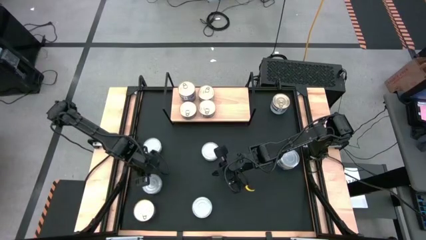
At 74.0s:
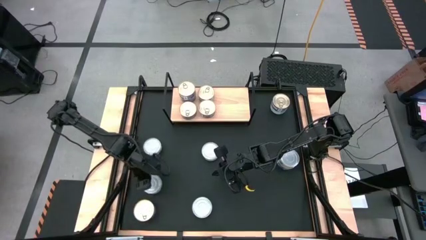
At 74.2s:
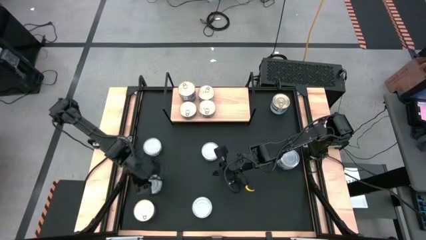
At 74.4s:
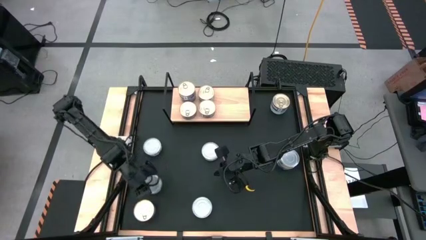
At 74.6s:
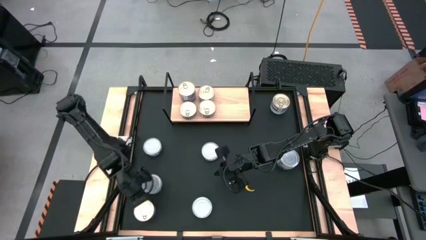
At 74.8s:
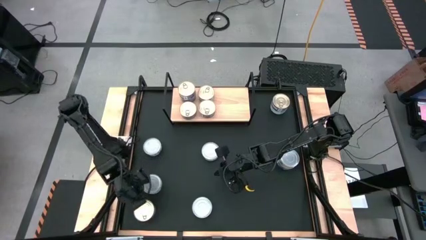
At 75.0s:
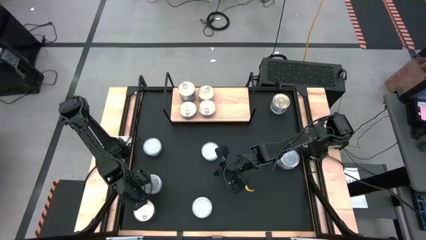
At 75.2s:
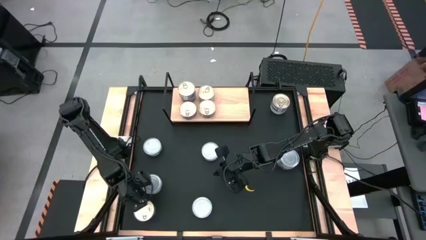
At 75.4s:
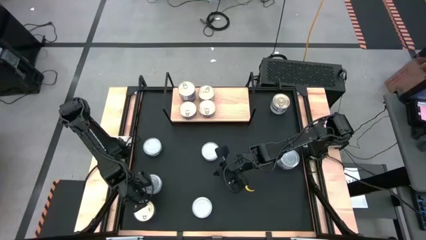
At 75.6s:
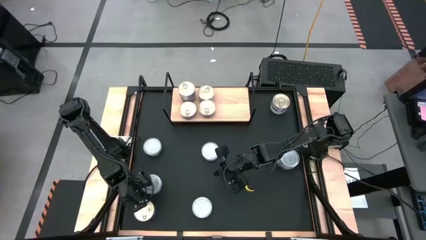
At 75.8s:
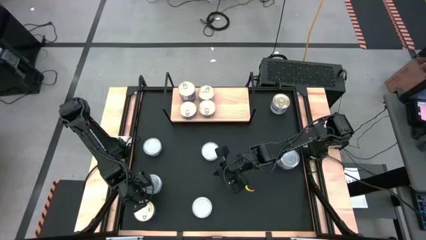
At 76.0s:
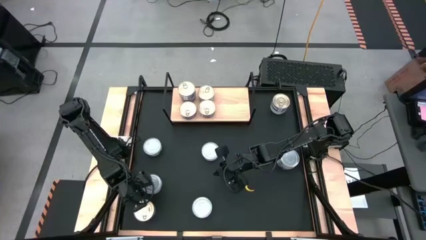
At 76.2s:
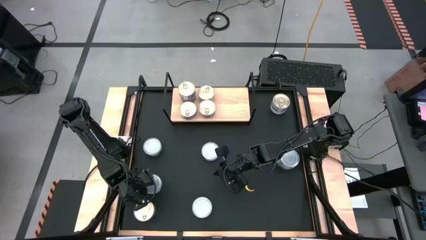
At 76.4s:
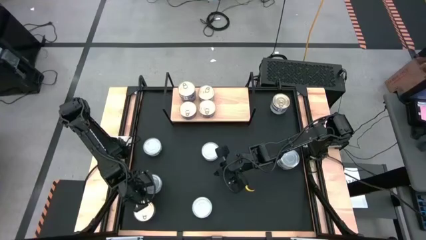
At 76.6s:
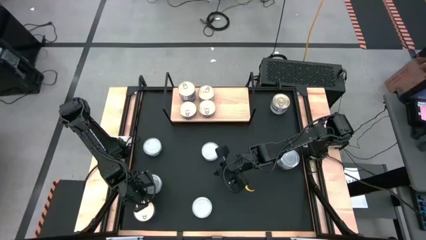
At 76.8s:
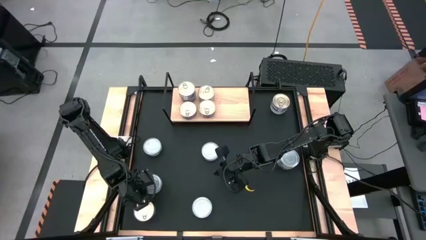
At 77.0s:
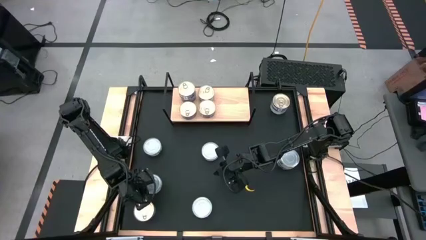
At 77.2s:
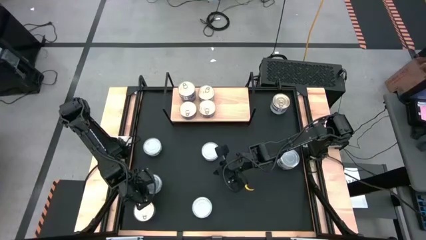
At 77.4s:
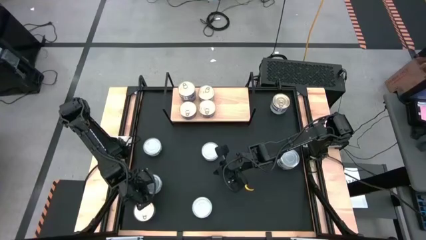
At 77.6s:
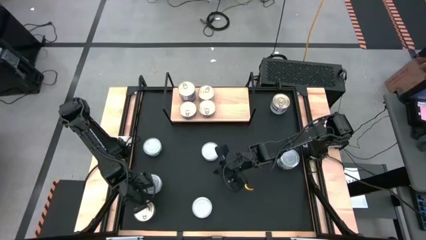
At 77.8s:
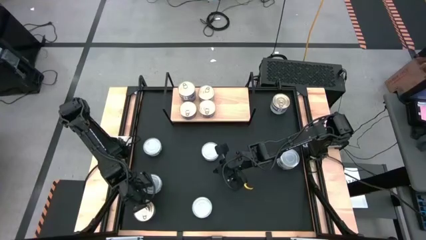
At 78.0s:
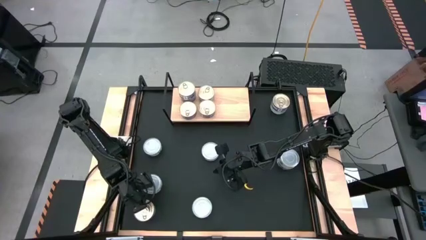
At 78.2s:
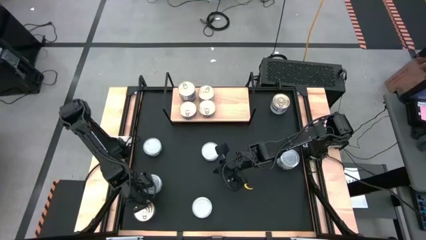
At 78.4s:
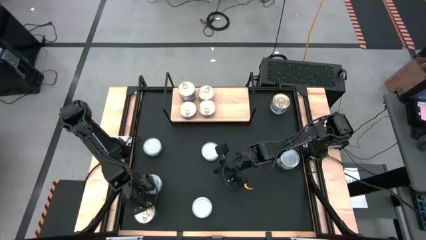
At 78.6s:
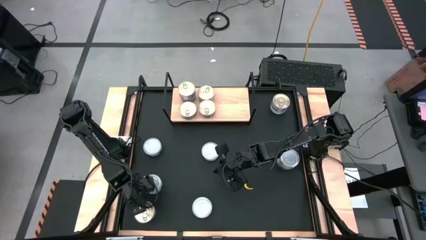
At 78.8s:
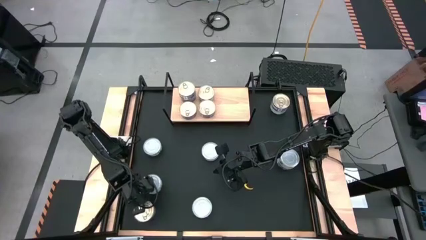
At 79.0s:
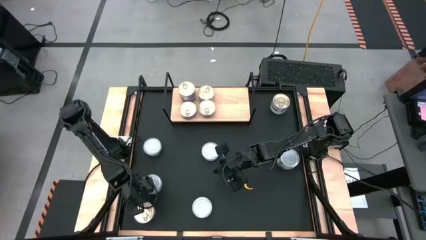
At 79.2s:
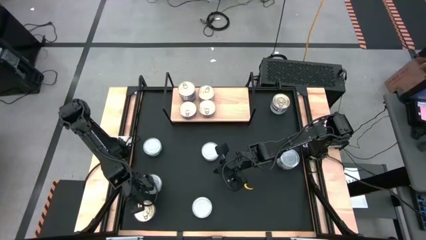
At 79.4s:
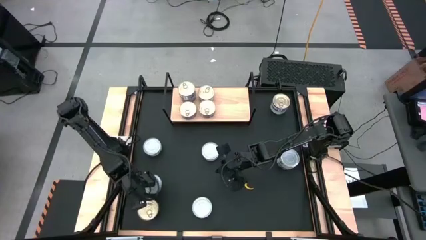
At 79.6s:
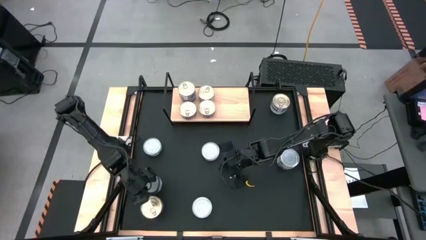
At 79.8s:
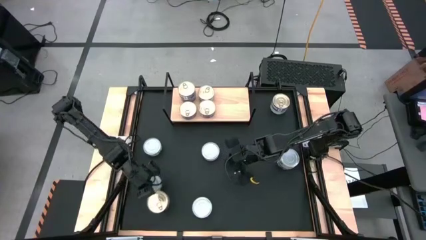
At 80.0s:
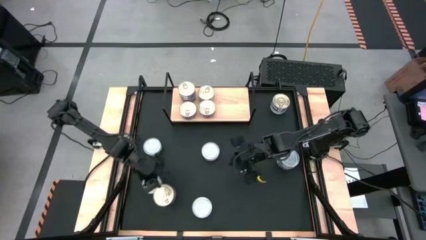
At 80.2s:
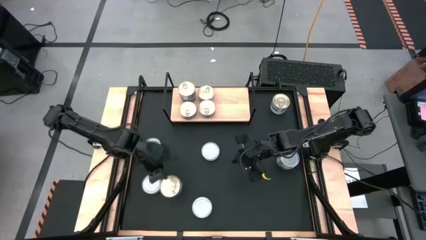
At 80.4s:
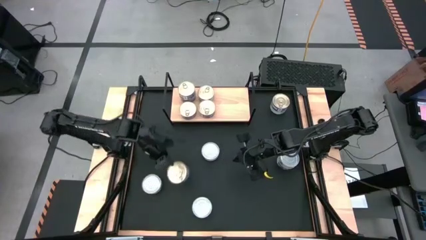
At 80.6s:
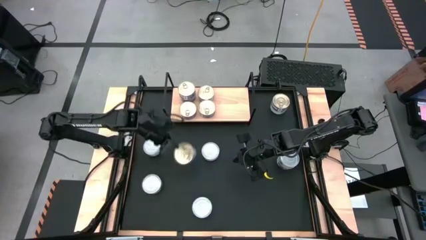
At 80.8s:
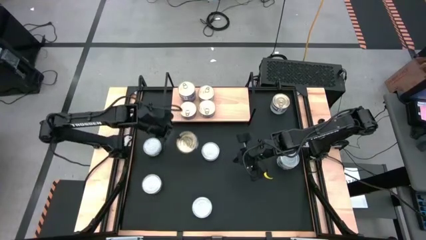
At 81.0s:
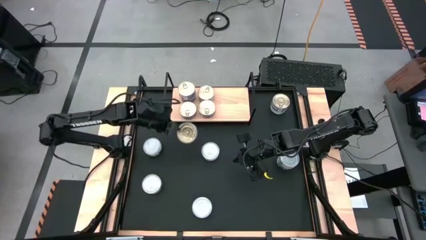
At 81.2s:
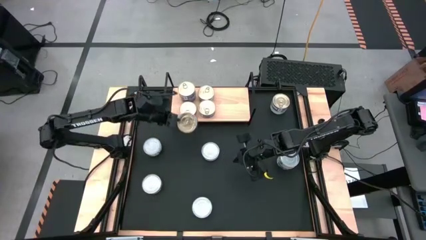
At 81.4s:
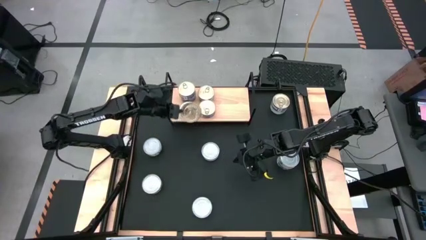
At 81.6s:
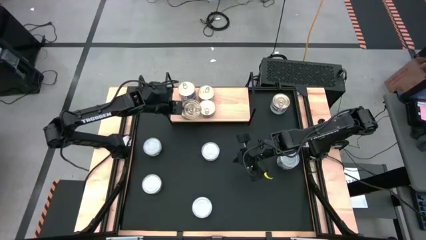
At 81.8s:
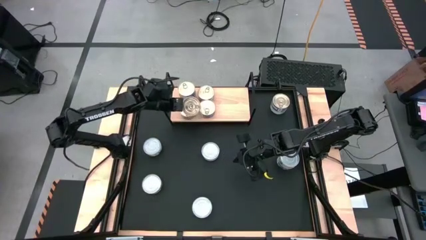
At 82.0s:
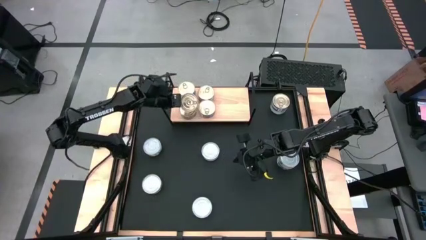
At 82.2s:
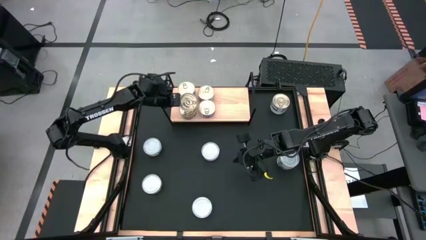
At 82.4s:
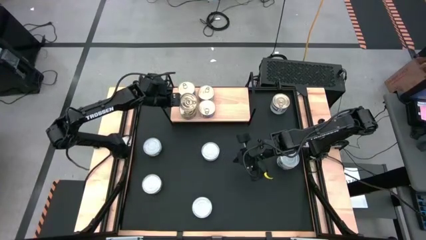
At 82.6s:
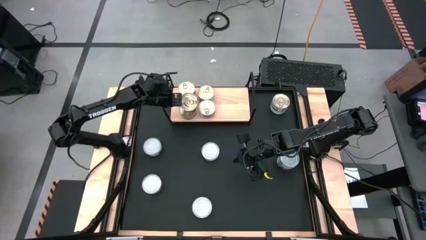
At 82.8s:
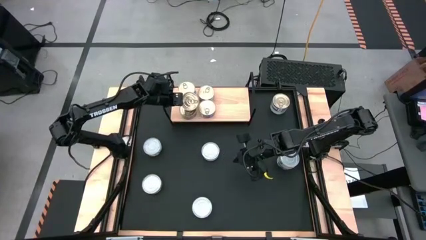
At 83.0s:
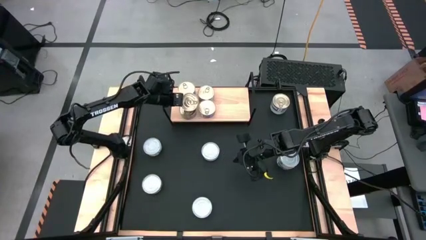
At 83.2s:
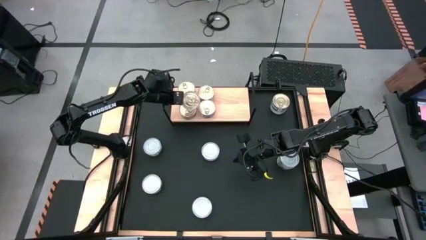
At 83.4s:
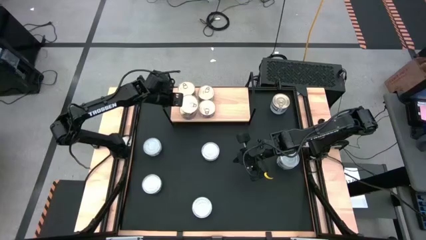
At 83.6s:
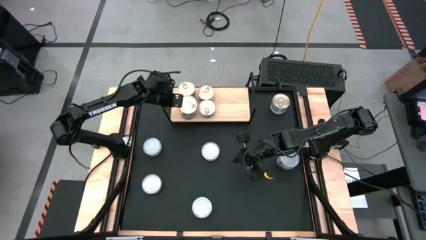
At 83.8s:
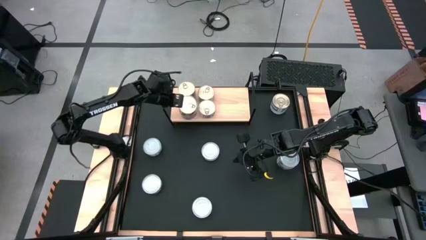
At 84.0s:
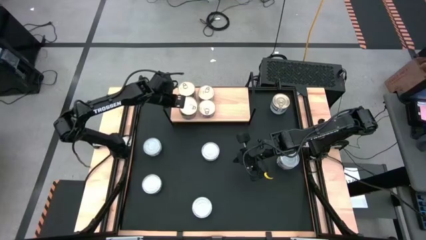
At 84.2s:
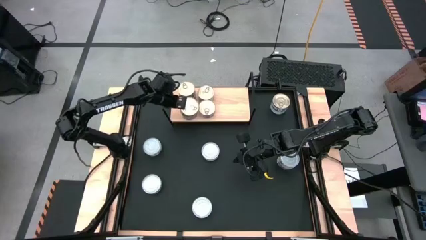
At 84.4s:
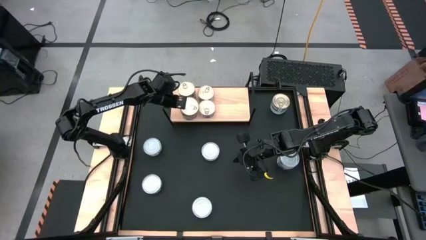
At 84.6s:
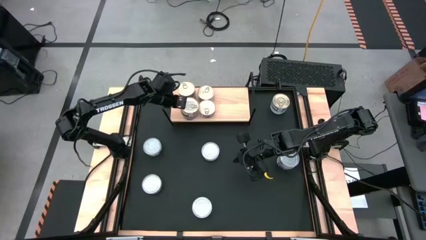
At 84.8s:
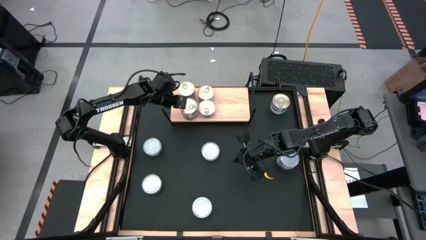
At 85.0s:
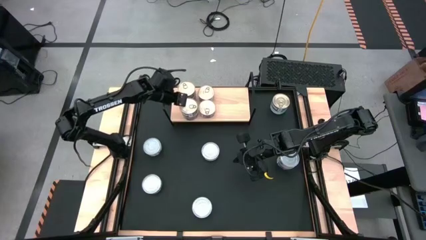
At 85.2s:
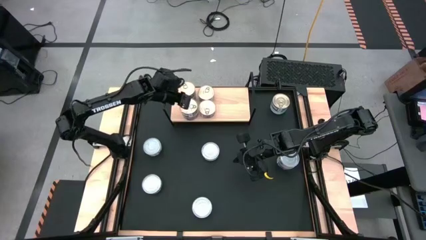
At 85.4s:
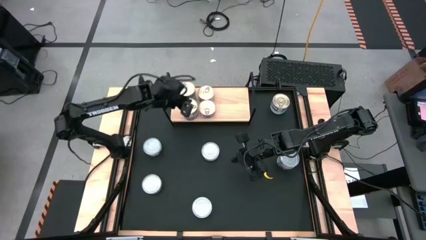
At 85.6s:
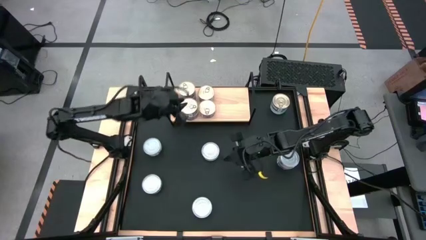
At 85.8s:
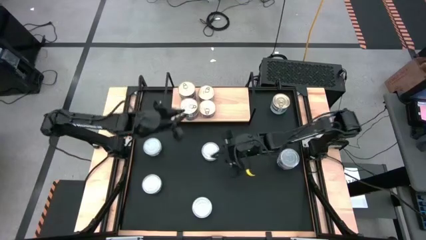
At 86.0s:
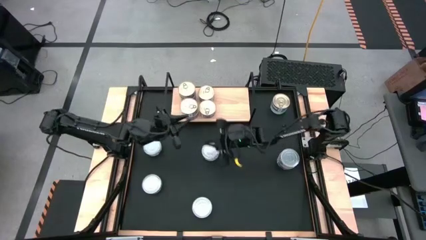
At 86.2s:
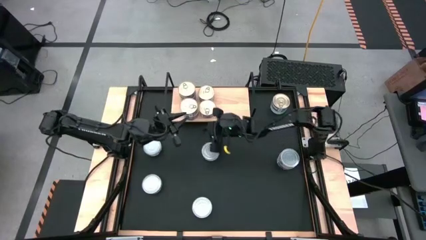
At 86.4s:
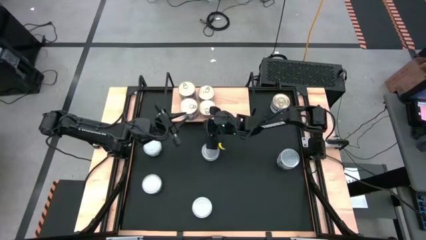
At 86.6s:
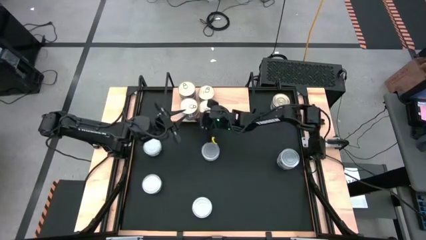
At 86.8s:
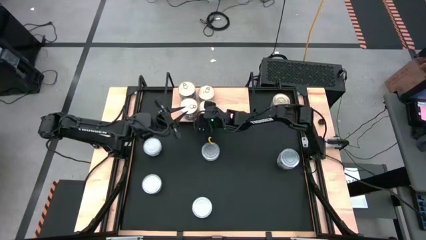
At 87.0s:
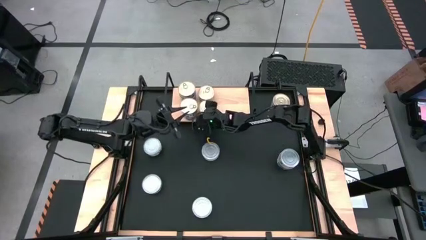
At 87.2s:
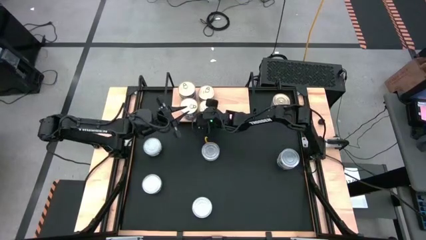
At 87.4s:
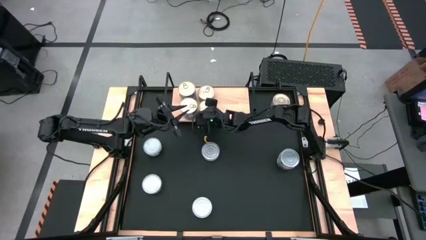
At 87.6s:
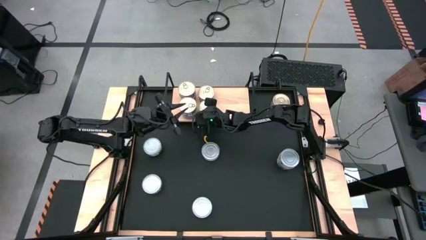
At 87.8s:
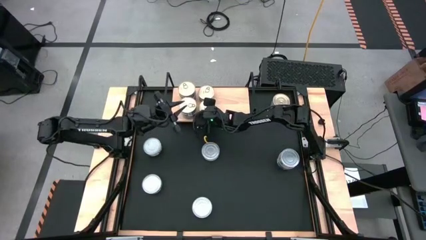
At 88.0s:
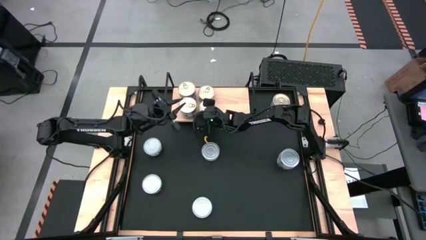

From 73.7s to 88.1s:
Task: Stack canned seafood by type on shelf
Stack the blue tuna can on top of the blue tuna can on the shelf

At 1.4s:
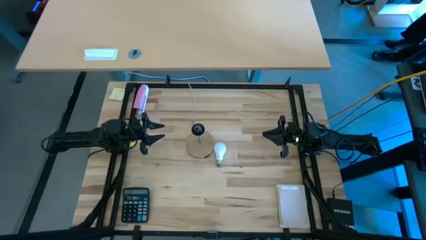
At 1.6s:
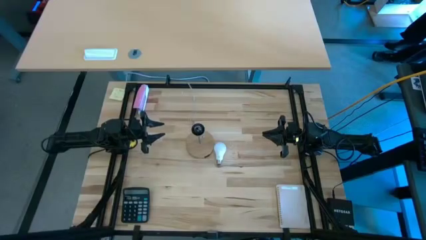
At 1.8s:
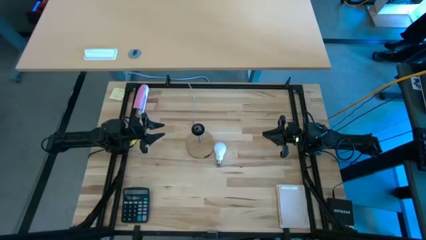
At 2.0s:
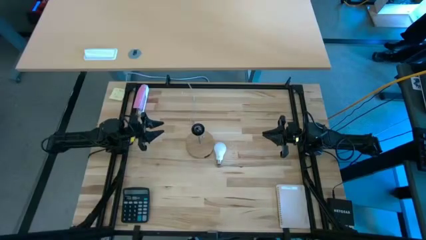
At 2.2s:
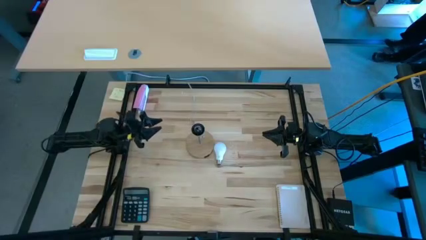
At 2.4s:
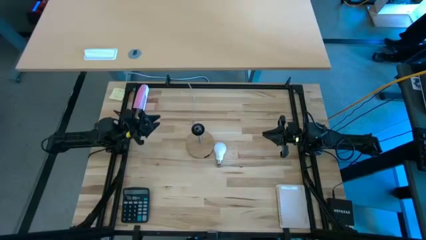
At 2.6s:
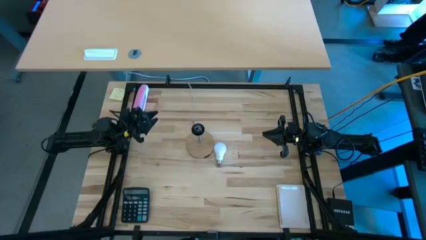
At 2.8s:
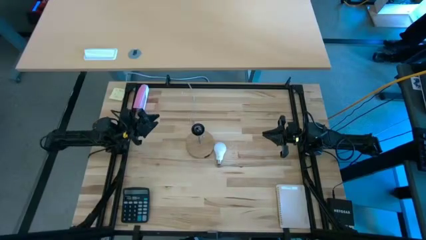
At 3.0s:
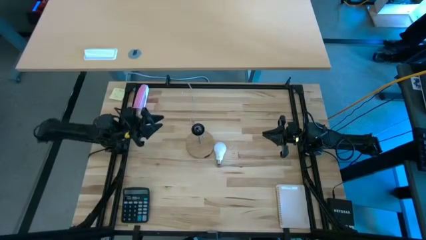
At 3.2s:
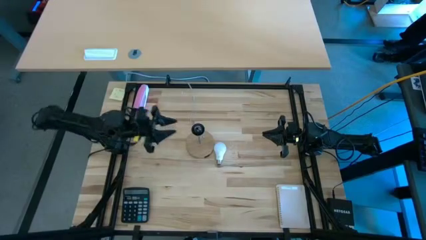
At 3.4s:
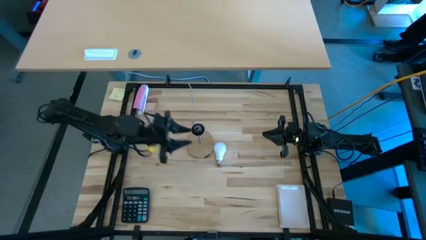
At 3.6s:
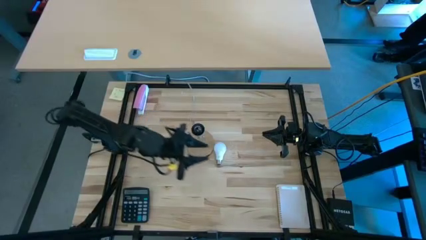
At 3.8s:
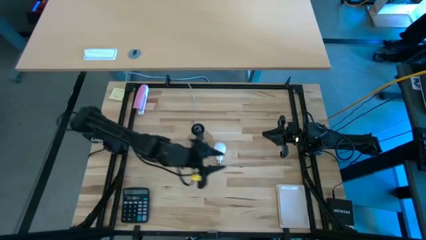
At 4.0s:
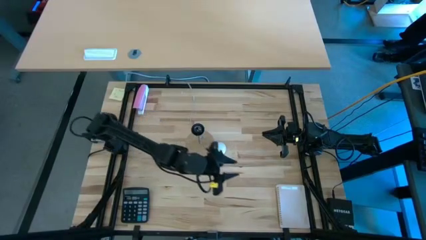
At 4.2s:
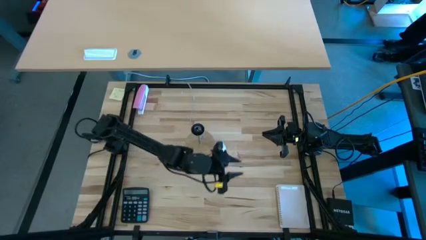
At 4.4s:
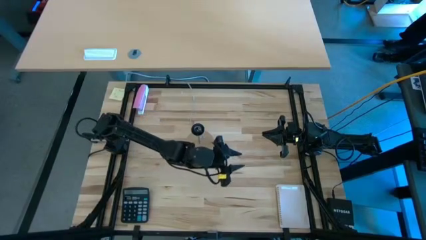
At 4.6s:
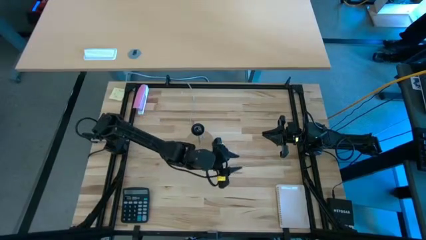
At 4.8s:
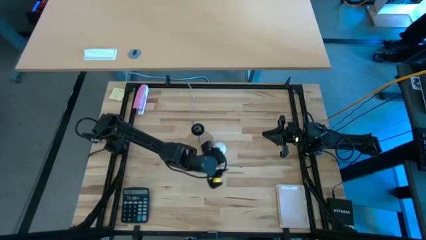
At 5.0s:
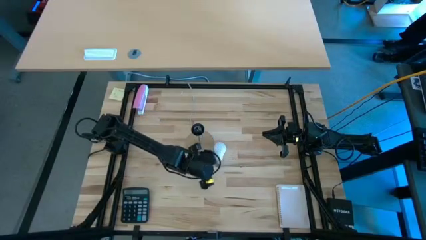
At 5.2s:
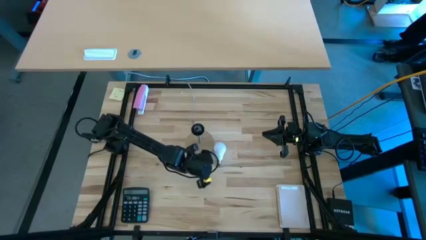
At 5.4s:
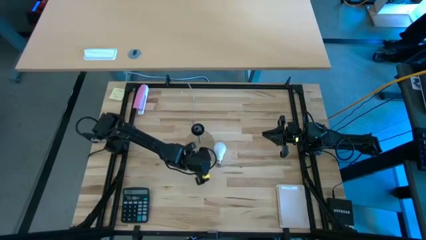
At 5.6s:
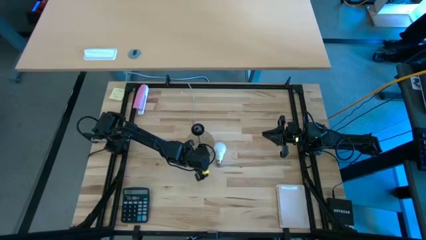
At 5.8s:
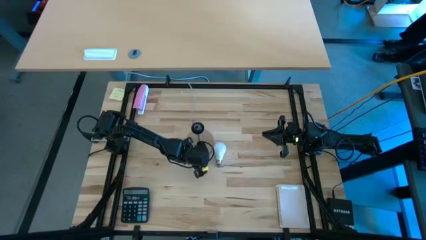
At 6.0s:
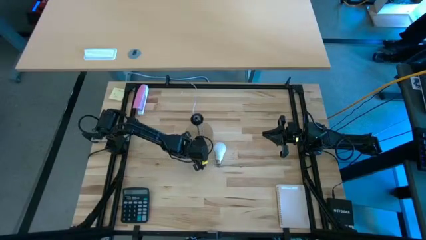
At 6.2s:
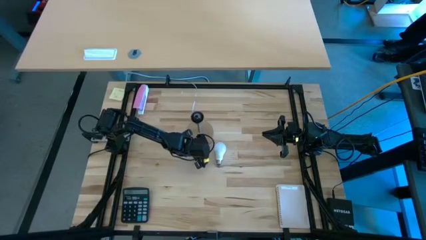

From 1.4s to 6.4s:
Task: Screw lightbulb
Adjust the brown lamp
